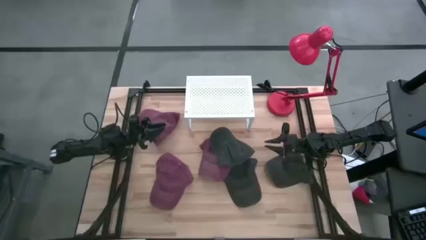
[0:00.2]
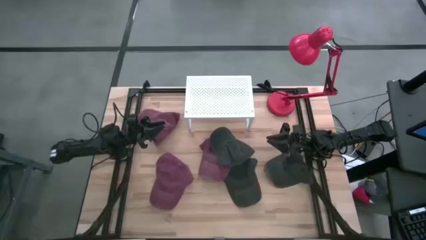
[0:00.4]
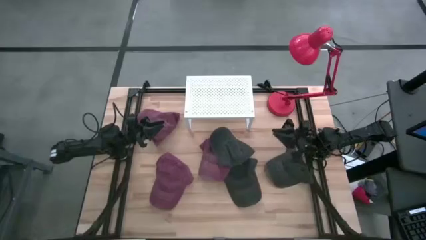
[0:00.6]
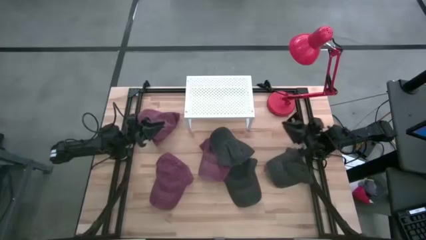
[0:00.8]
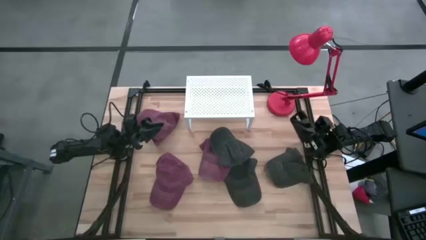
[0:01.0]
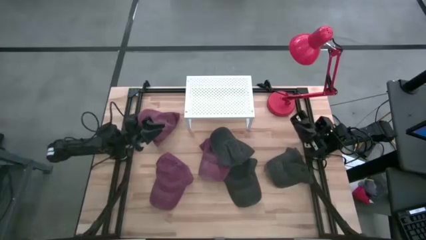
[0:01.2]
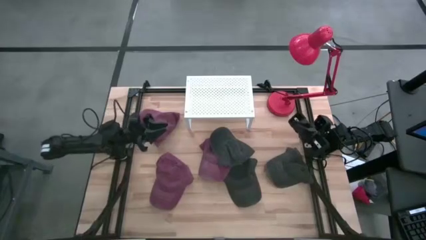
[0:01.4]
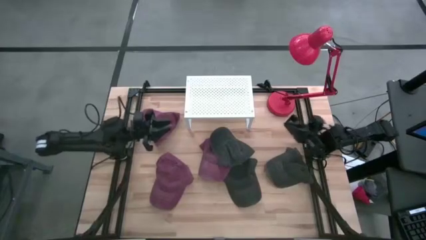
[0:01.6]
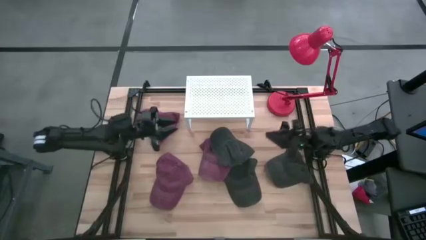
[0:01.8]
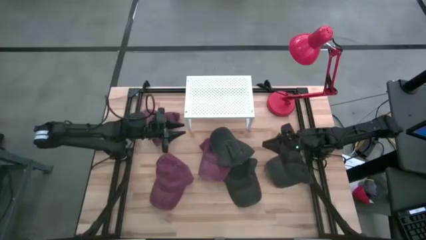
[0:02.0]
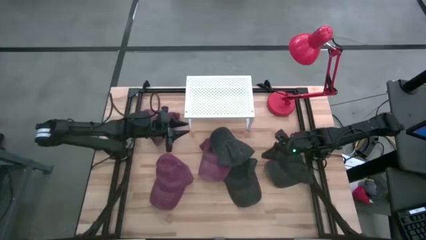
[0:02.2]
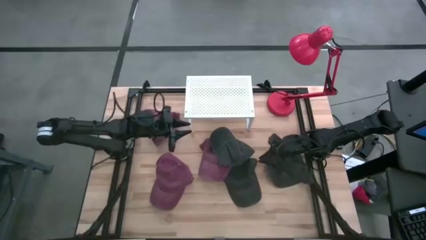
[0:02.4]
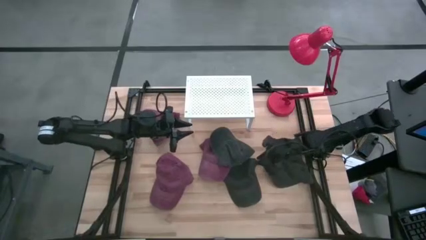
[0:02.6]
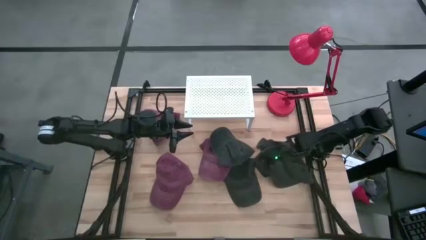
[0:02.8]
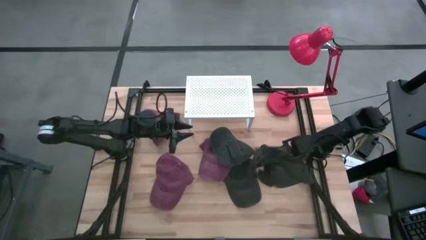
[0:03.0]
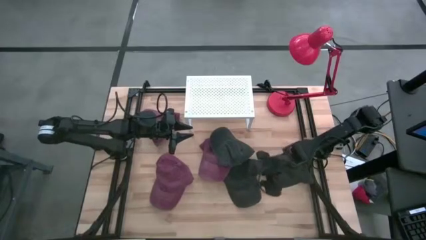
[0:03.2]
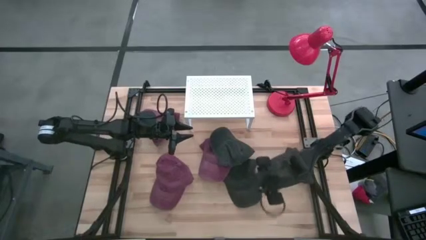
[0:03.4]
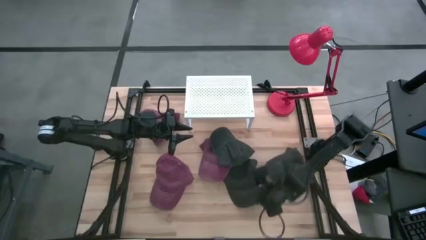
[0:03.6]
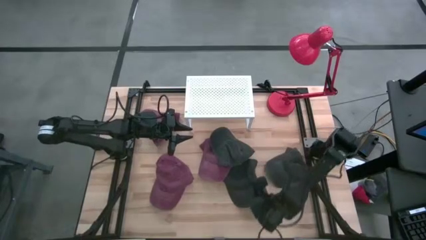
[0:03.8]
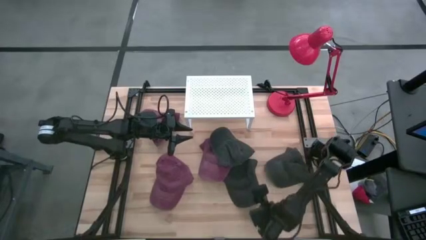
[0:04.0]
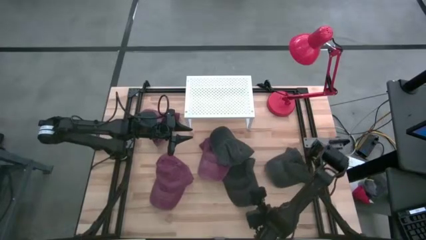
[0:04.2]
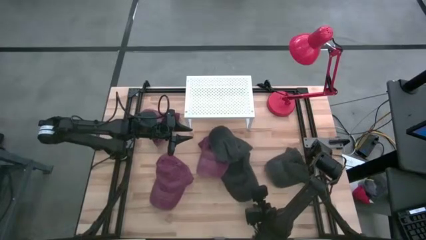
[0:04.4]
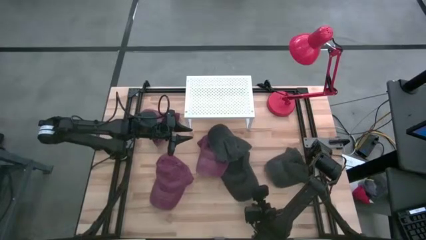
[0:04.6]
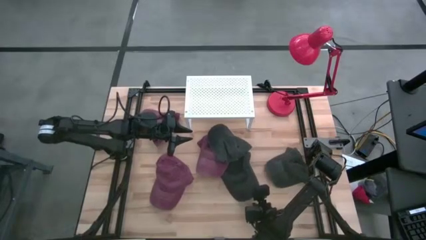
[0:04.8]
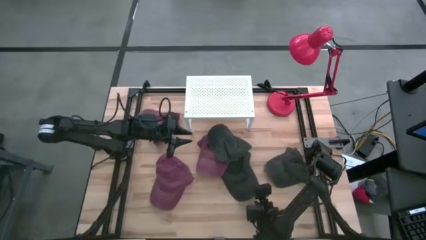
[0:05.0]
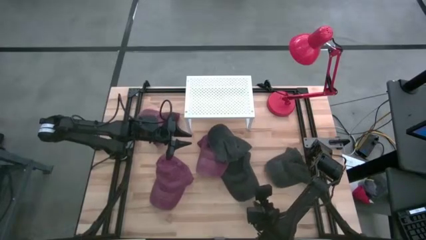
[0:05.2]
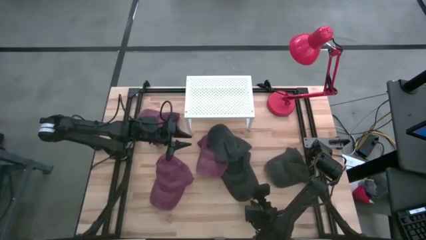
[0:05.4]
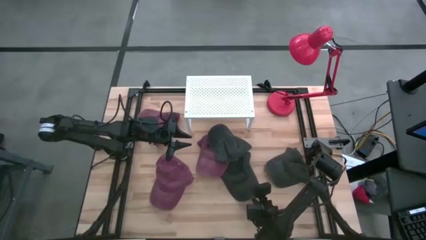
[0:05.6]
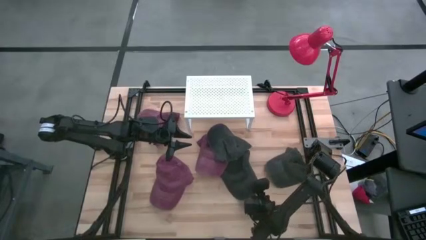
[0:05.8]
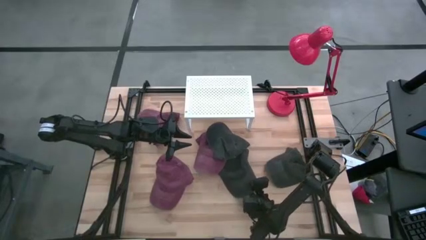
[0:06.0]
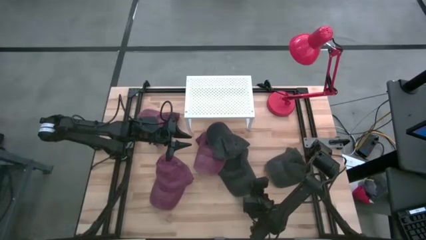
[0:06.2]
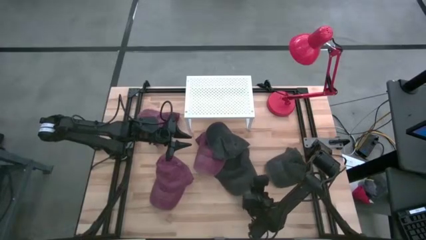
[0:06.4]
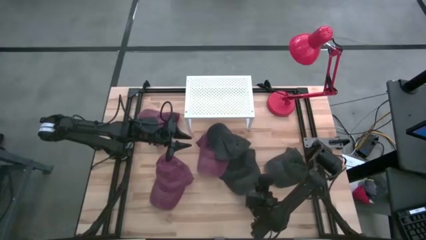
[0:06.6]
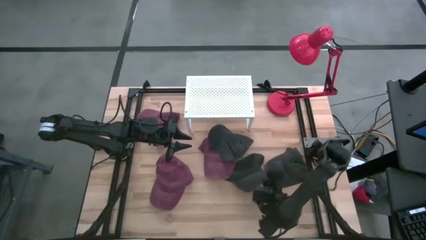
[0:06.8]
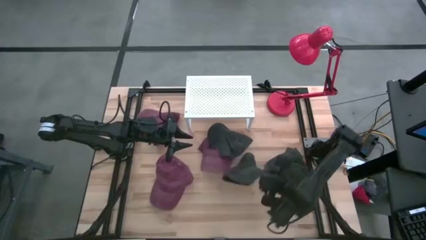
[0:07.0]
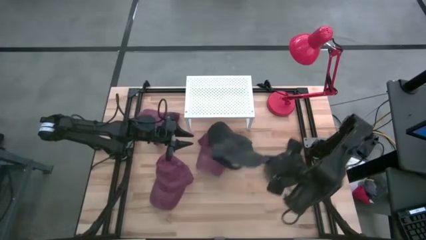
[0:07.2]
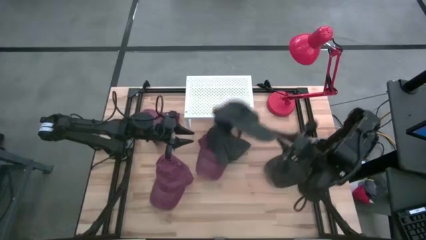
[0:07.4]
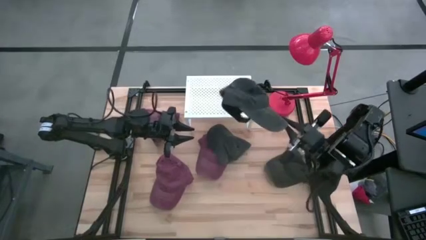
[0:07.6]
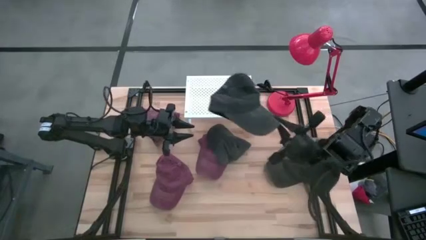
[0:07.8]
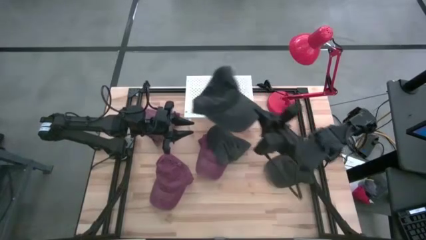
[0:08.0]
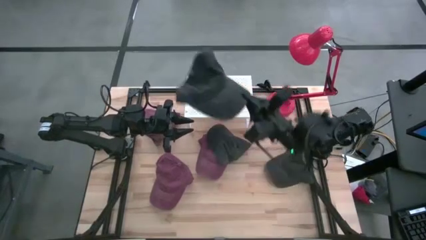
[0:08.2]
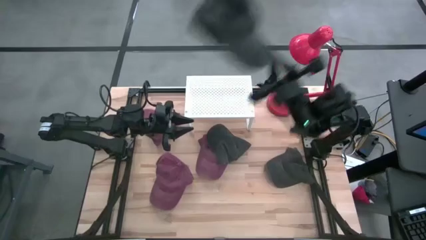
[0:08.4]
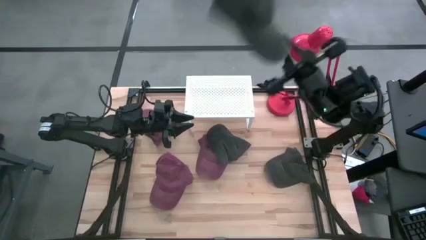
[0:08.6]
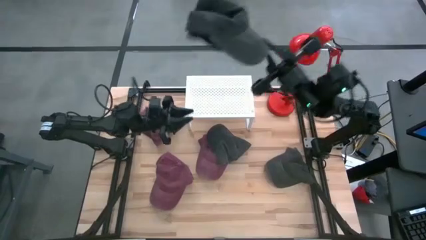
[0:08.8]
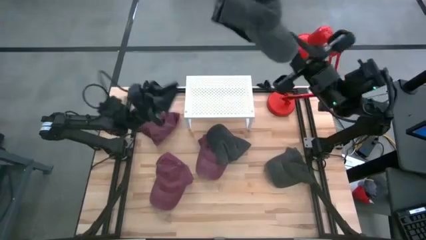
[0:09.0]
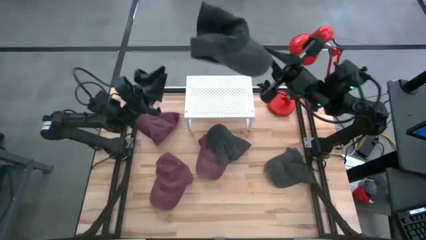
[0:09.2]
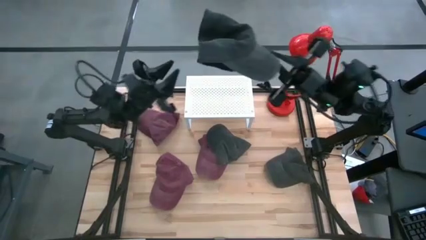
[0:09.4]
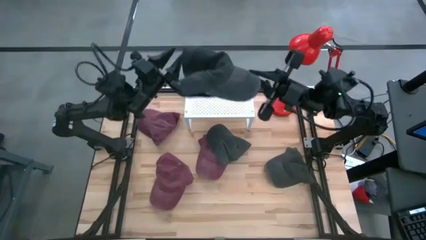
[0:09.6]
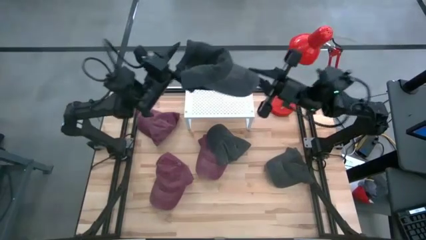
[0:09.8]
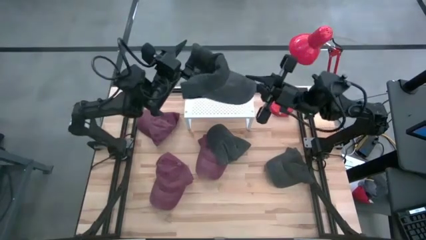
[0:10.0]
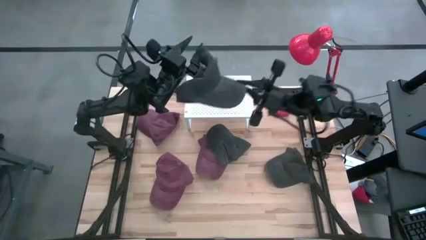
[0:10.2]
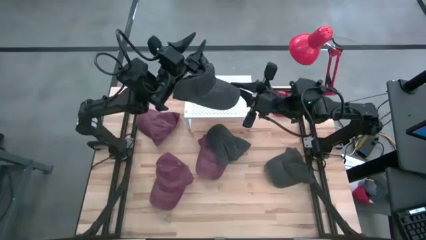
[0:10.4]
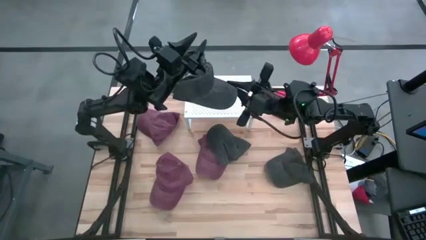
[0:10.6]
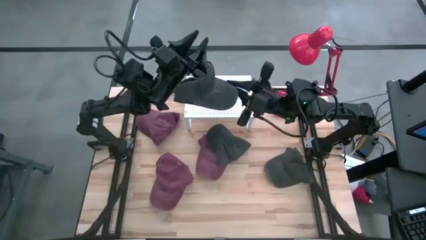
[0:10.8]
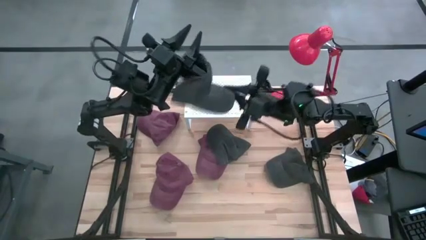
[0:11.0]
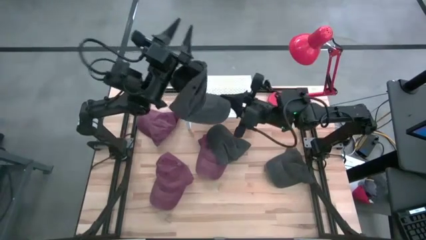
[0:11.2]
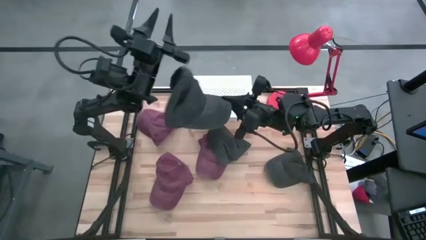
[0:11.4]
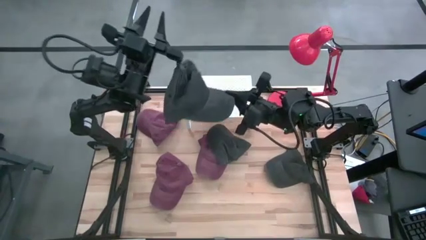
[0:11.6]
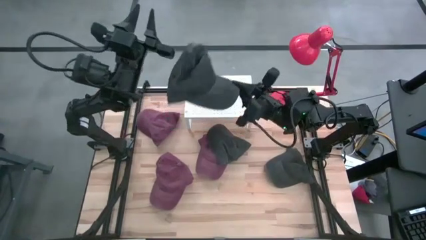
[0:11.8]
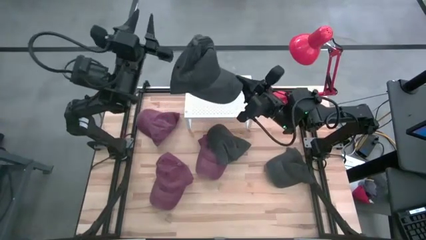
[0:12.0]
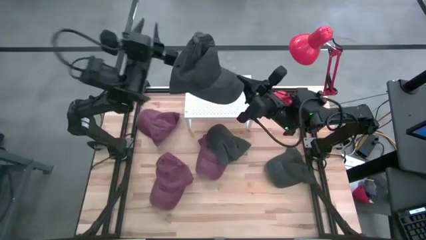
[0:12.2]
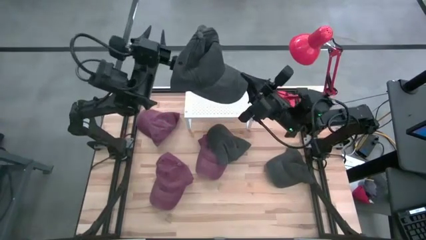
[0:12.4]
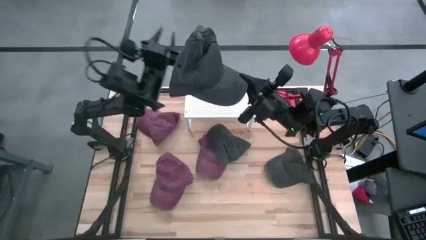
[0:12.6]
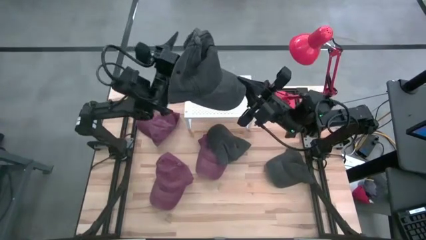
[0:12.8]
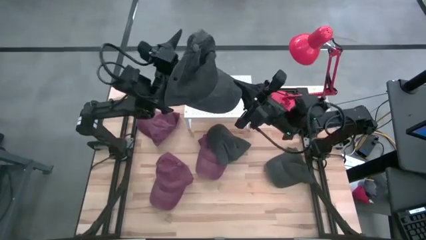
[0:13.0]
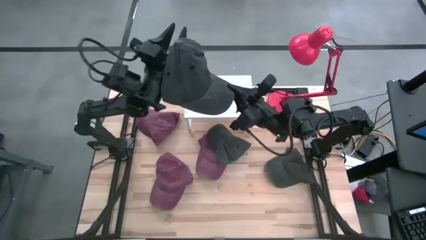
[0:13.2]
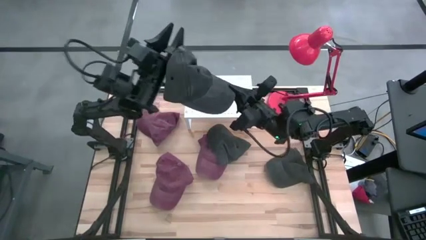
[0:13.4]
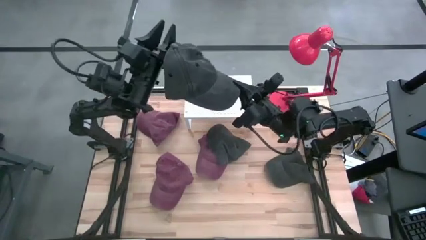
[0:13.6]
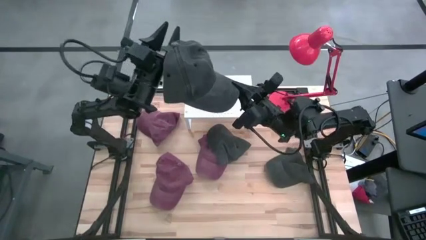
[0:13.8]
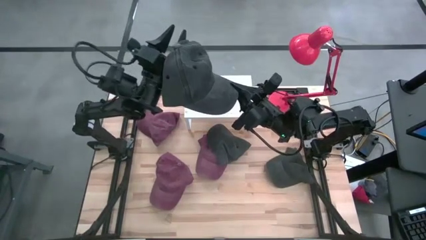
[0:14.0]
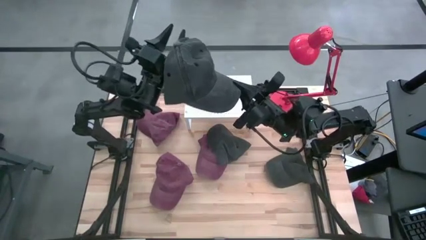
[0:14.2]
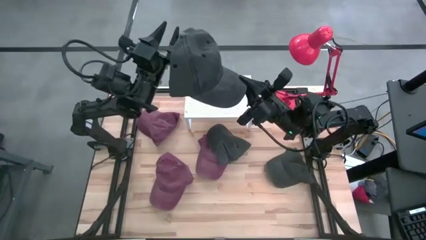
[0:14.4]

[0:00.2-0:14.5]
Task: Pick & Place hat
Put the bottom left black cap on the shelf
